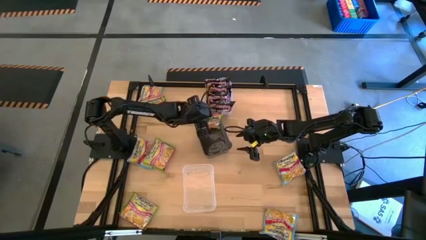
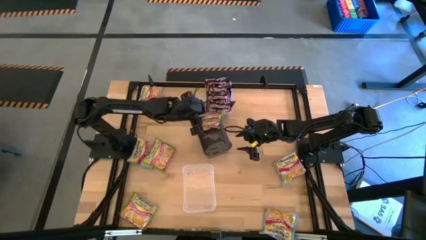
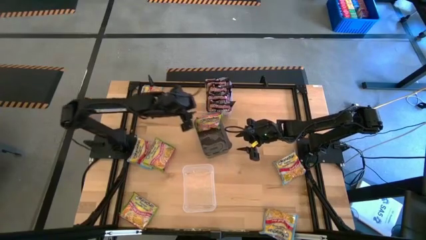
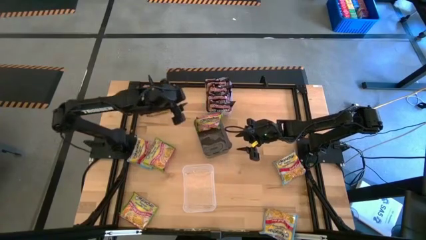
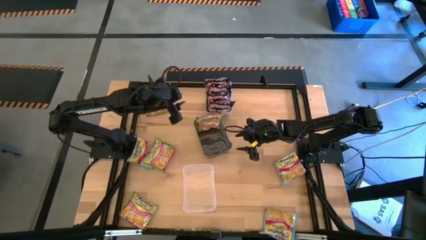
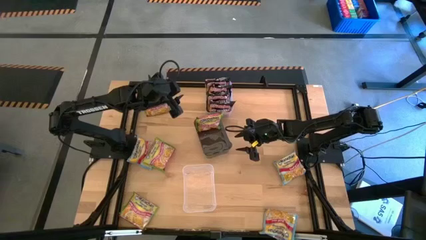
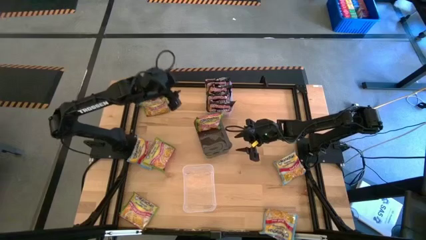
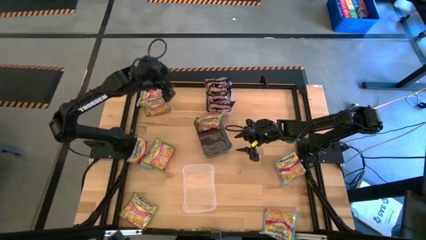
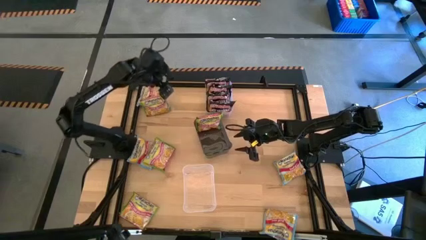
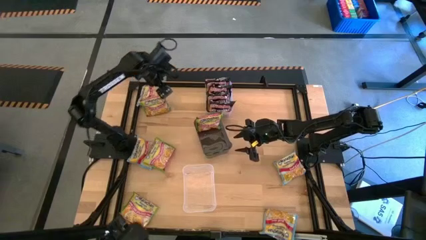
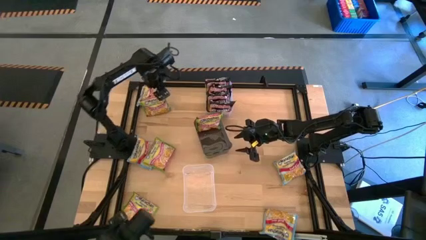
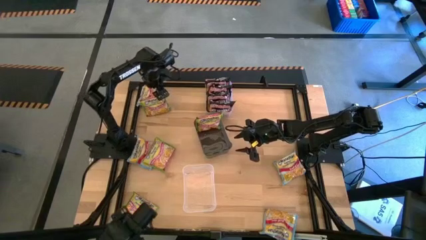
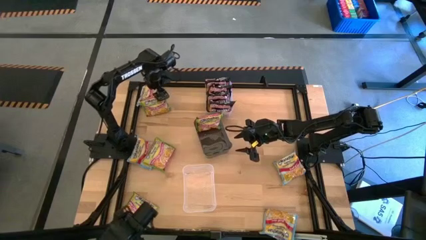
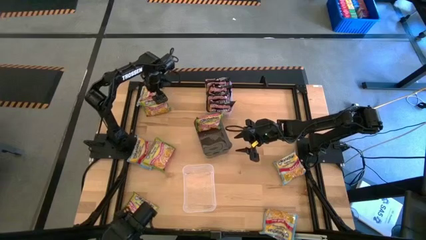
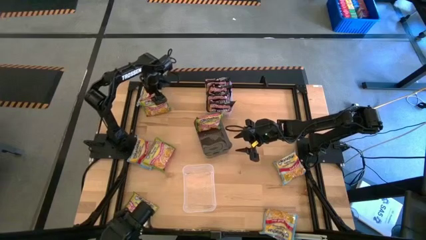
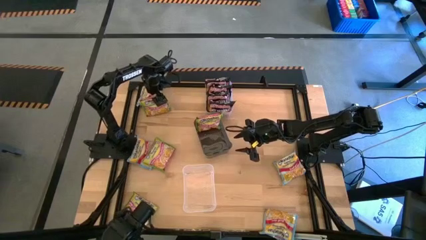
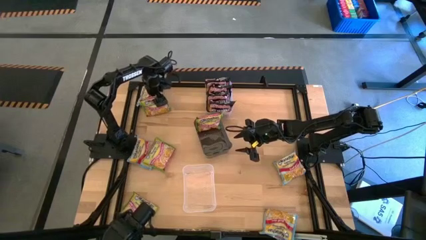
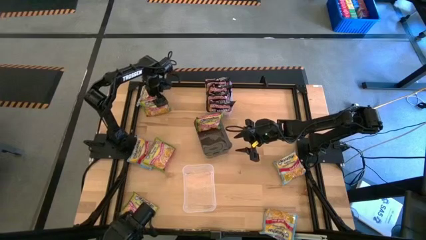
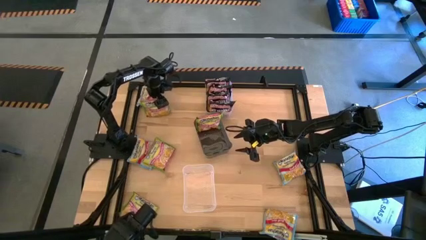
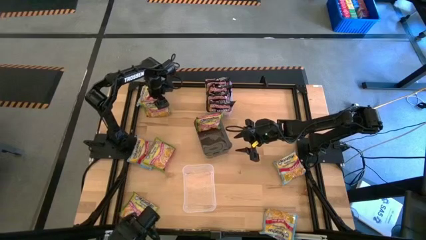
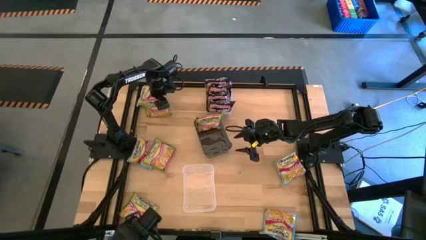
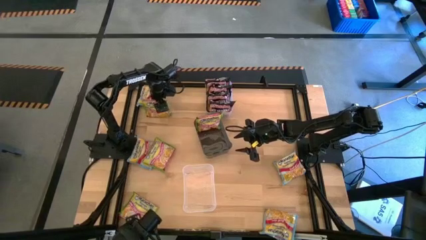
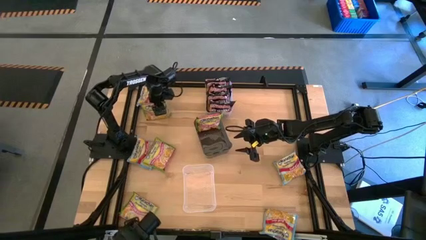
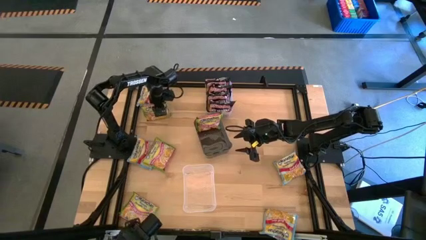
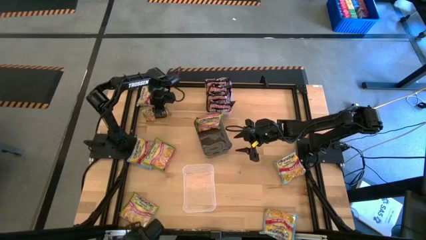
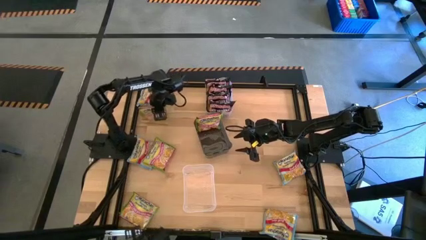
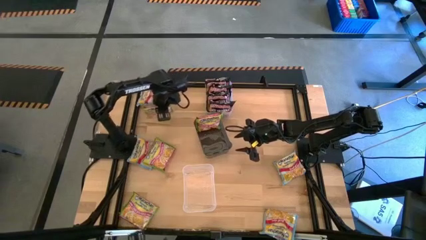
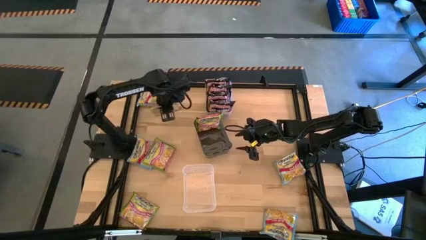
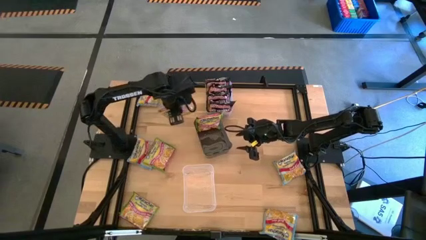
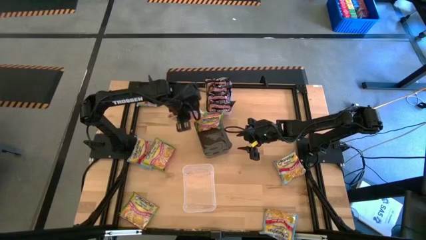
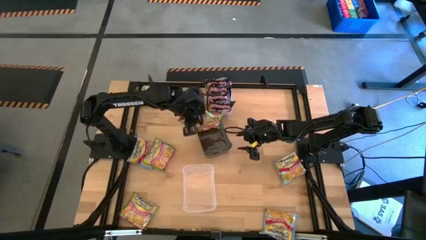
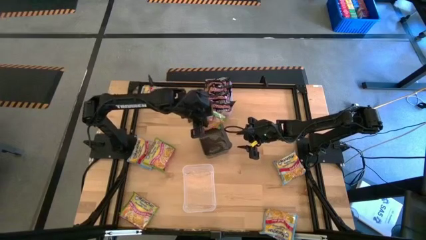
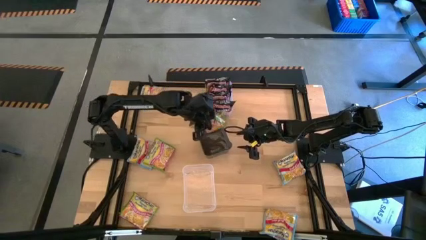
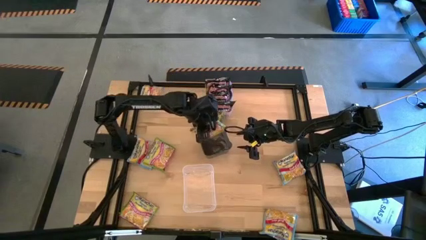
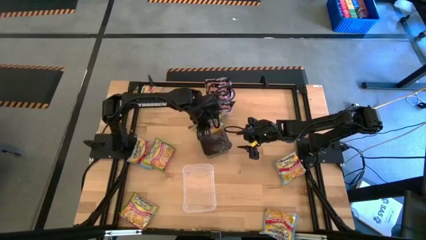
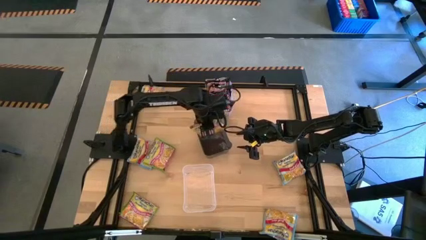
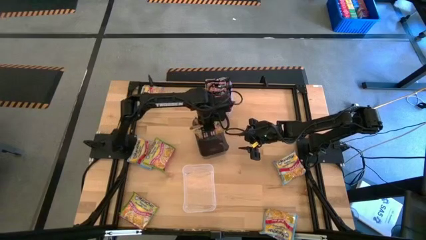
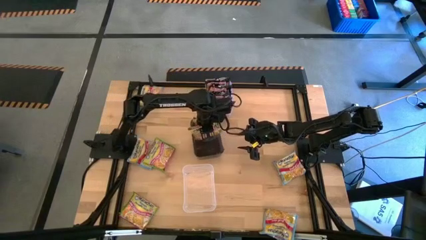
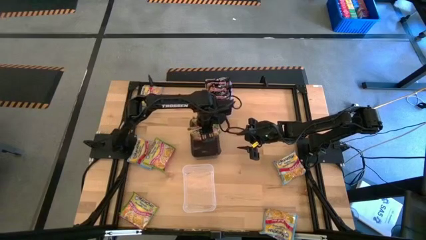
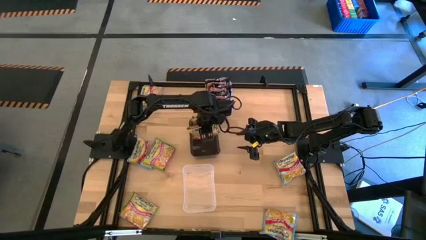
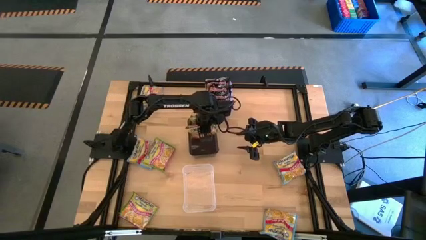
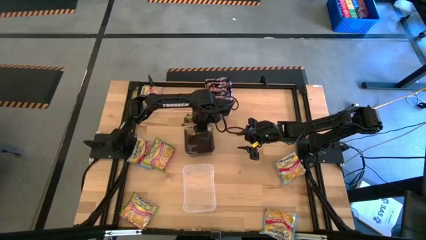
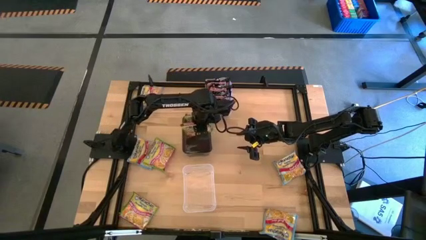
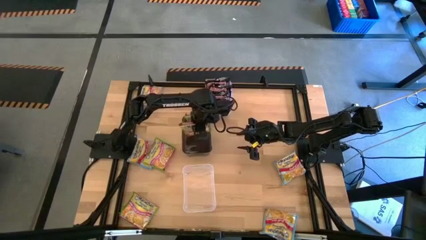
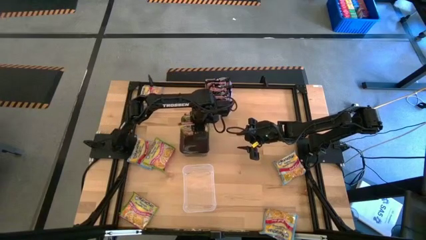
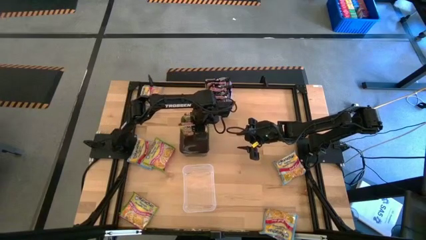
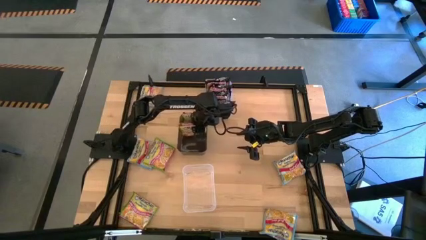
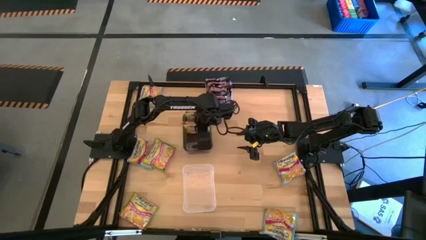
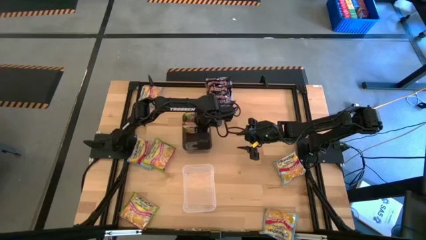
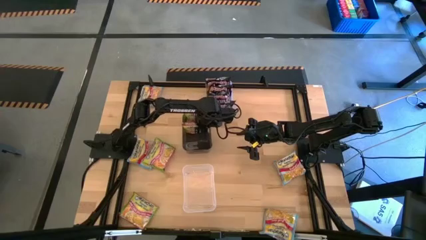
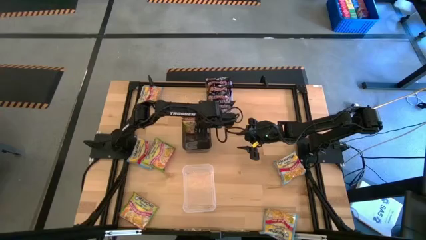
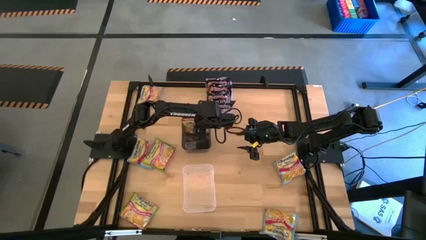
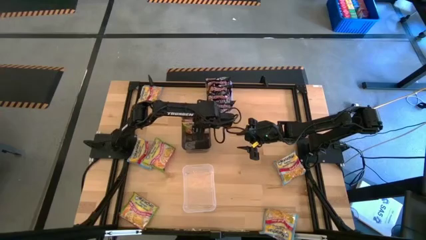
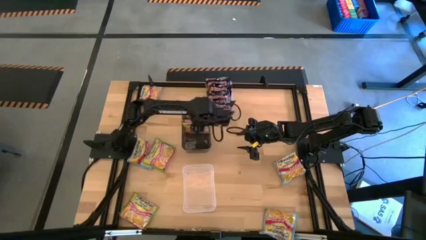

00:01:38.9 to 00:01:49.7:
Task: Sort Maruchan noodles
Put the top green noodle pack into the black bin

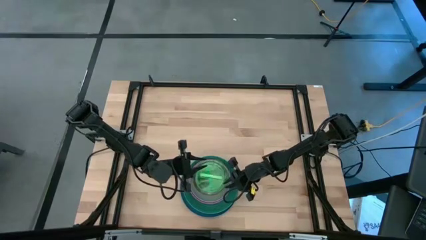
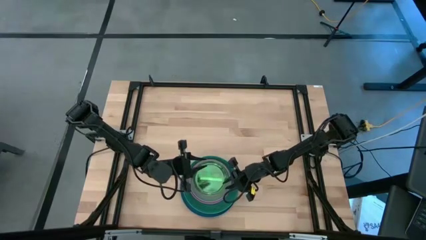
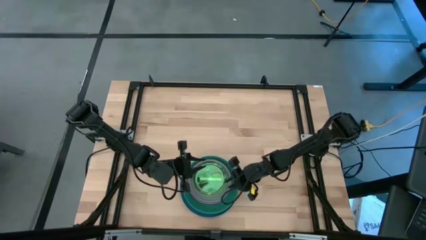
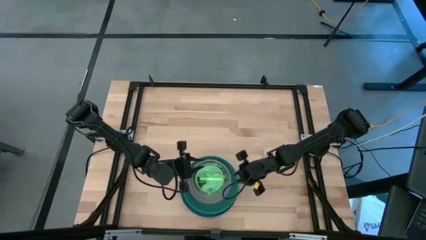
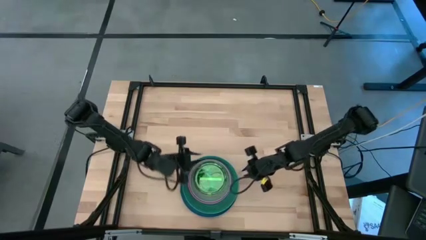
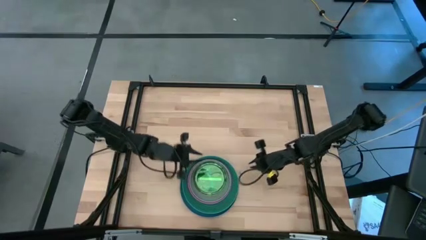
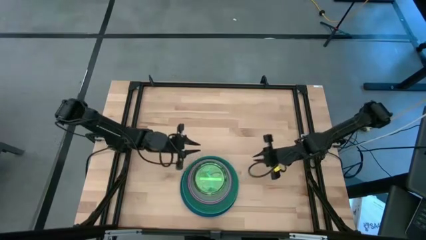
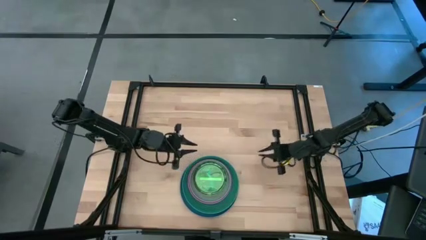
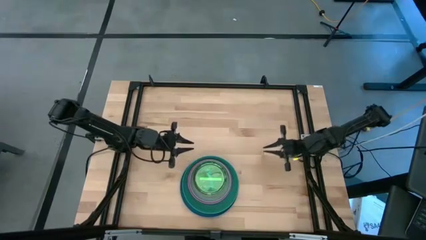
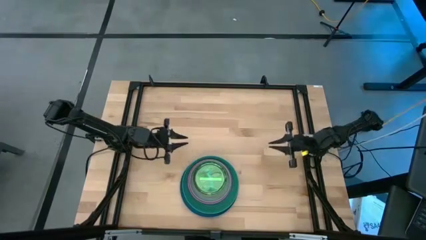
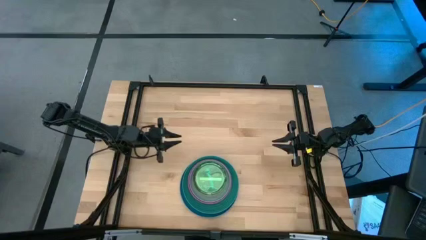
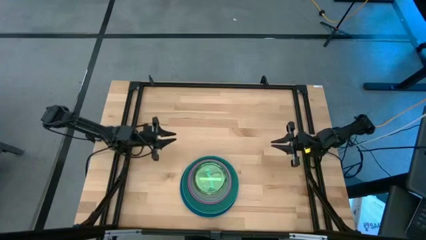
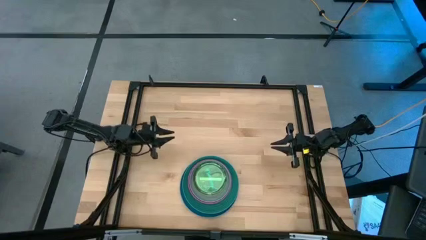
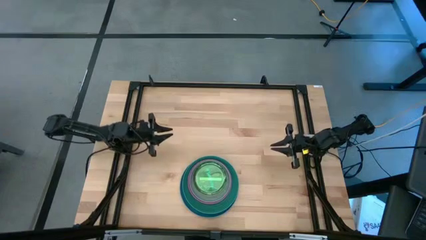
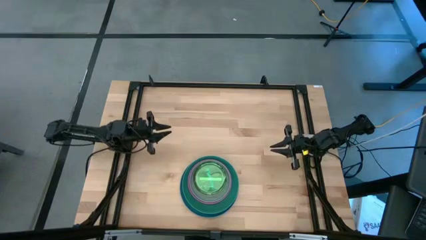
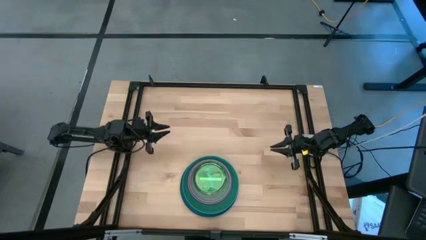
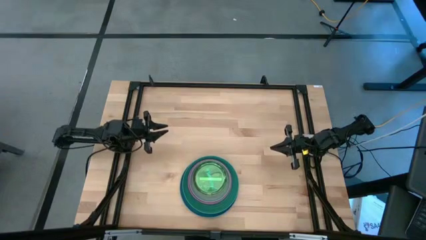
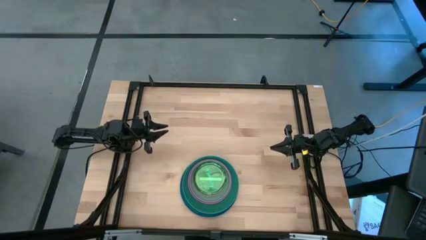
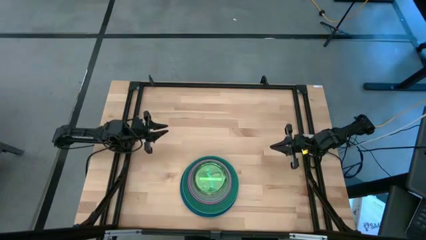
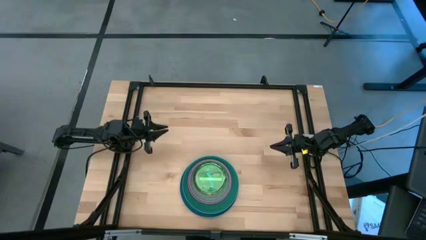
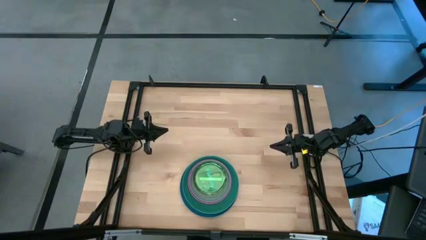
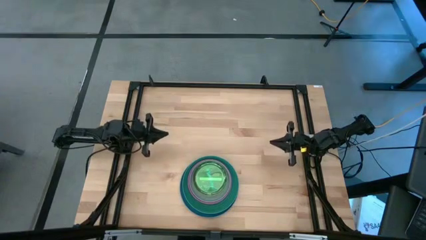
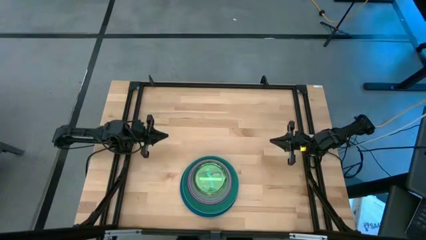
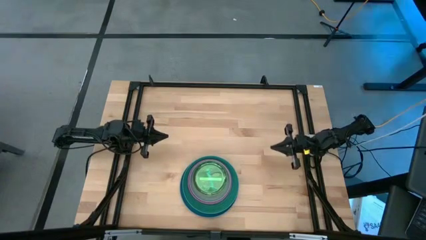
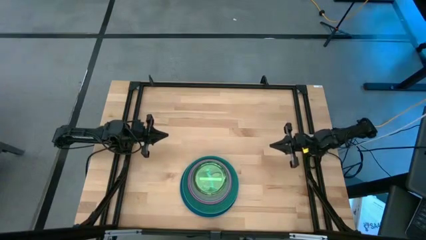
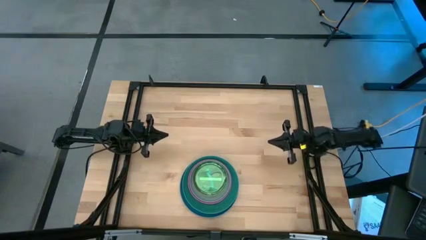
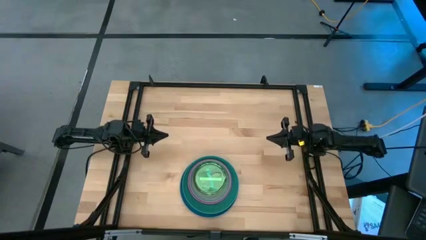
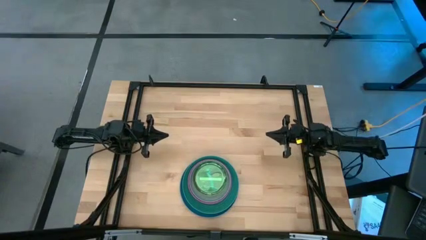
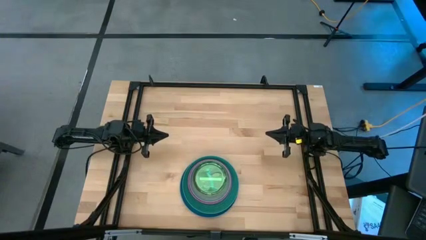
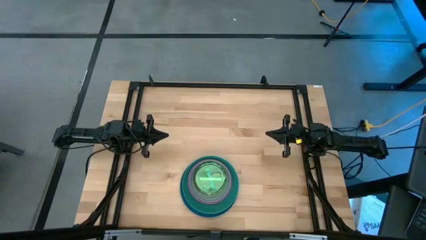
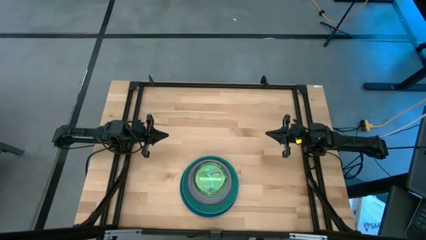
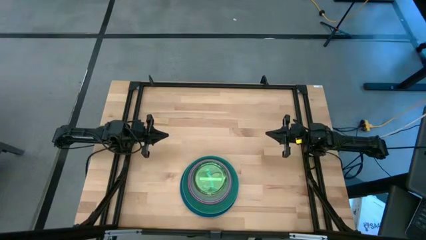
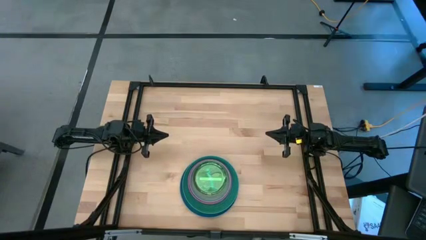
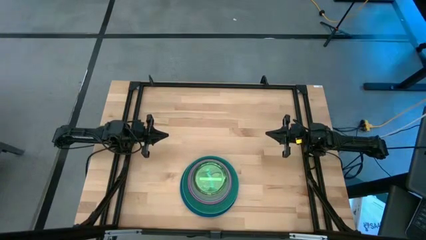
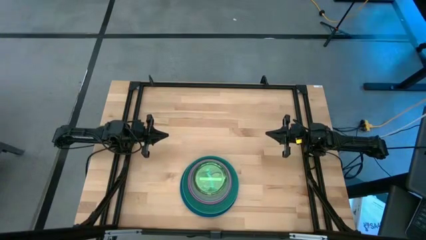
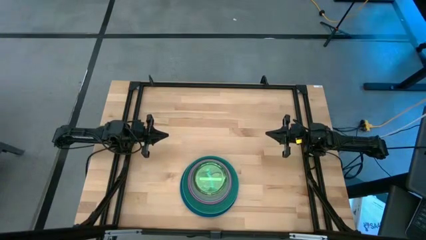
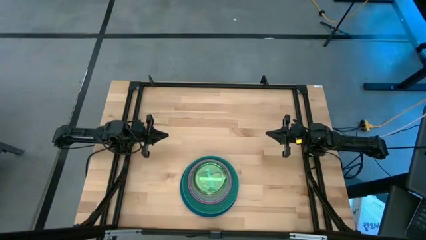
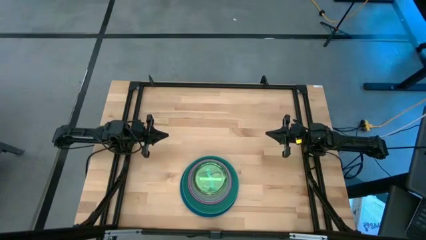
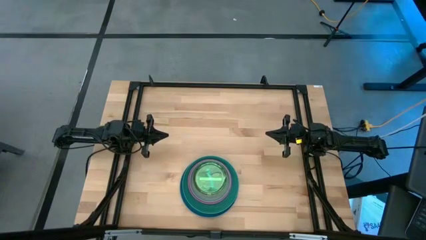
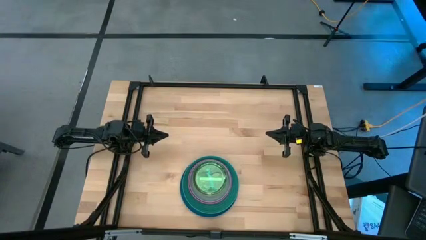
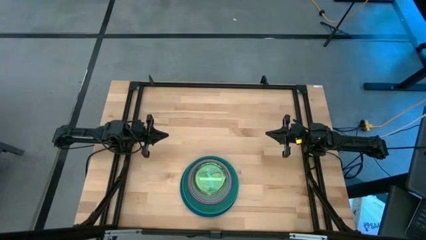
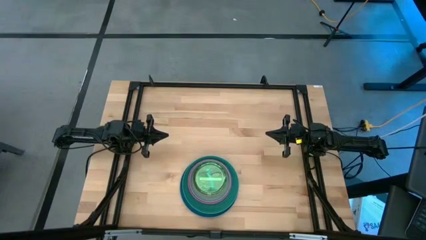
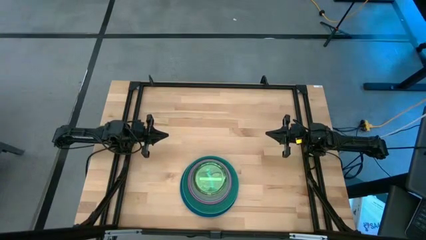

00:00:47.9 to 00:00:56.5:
Task: Stack plastic plates
Return to Home Position
